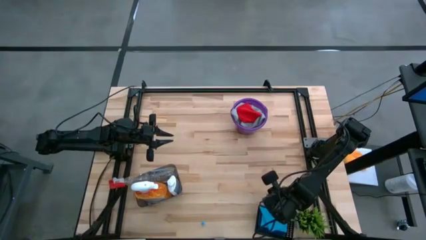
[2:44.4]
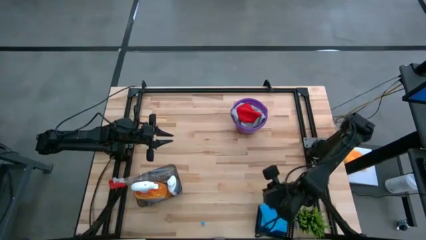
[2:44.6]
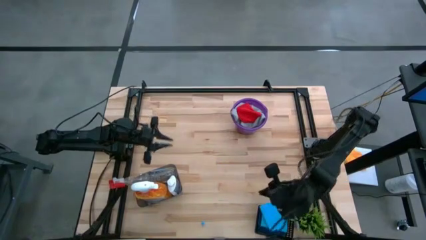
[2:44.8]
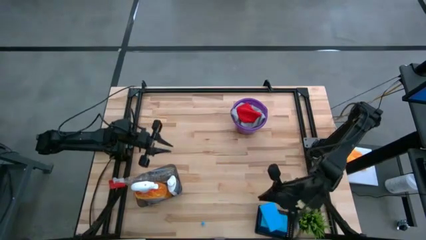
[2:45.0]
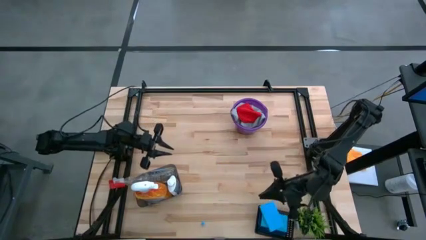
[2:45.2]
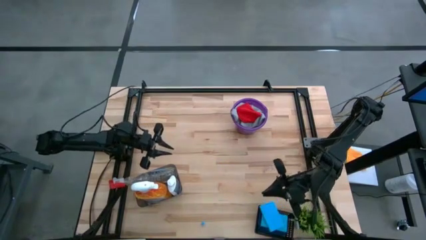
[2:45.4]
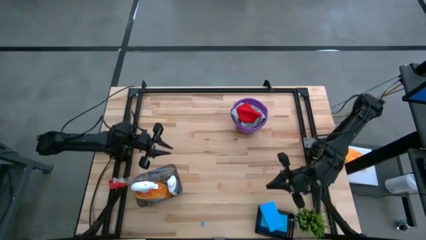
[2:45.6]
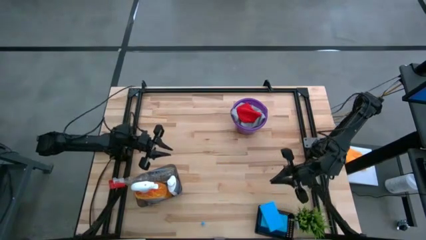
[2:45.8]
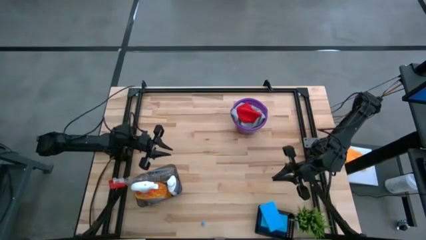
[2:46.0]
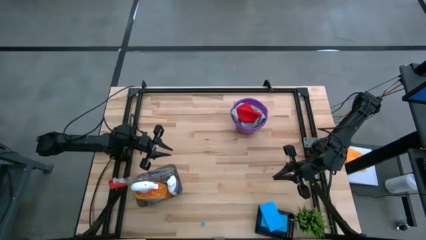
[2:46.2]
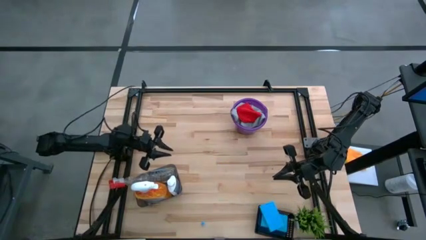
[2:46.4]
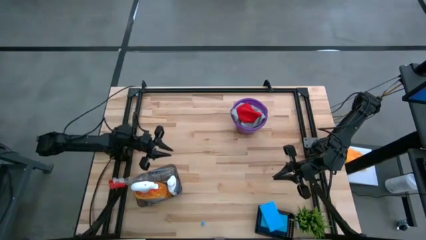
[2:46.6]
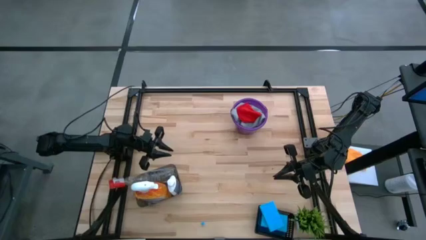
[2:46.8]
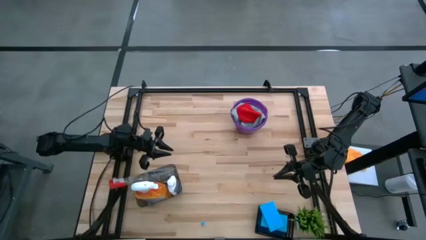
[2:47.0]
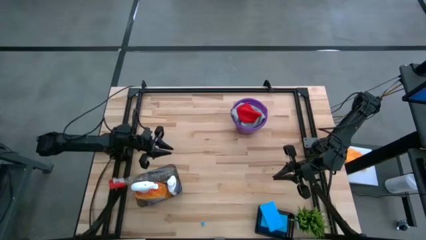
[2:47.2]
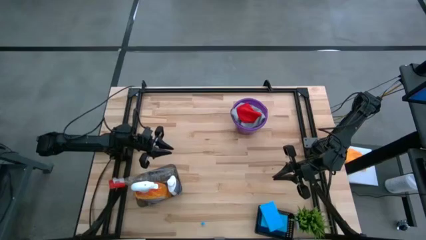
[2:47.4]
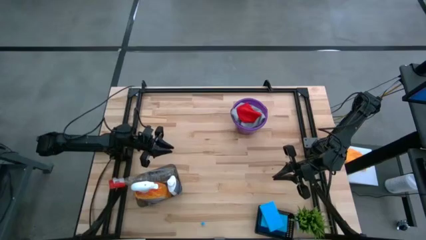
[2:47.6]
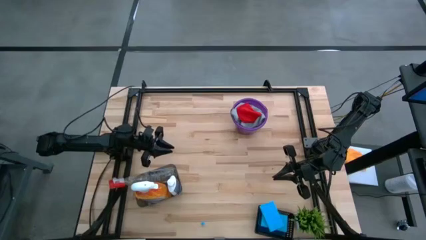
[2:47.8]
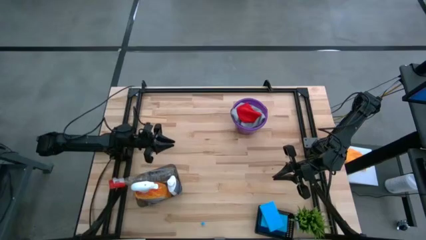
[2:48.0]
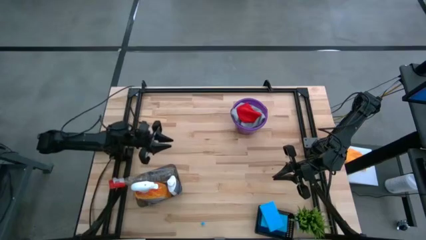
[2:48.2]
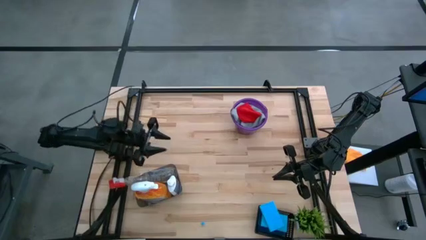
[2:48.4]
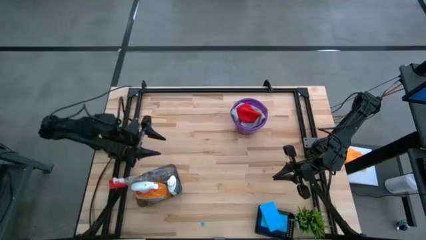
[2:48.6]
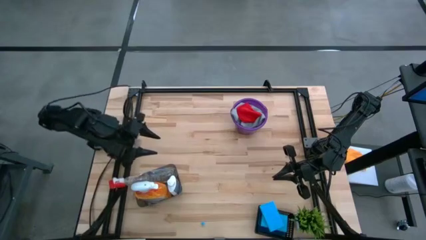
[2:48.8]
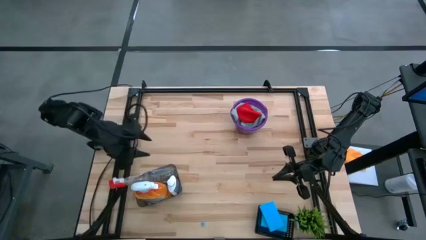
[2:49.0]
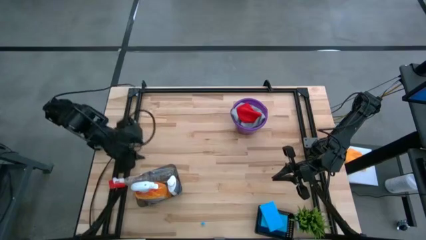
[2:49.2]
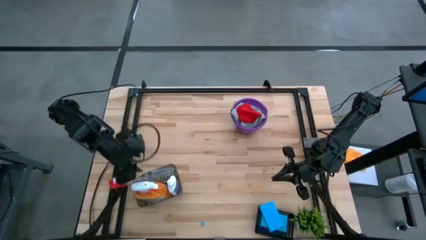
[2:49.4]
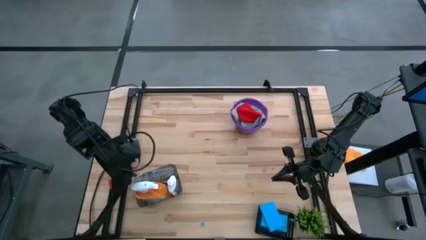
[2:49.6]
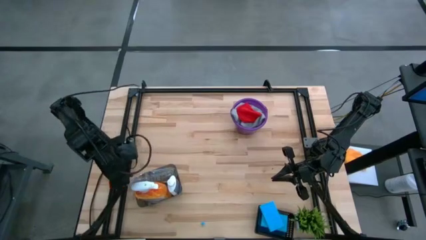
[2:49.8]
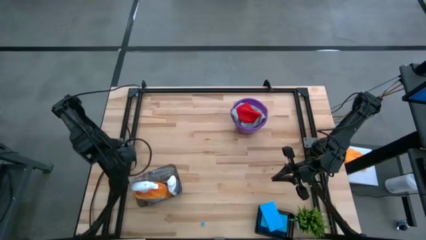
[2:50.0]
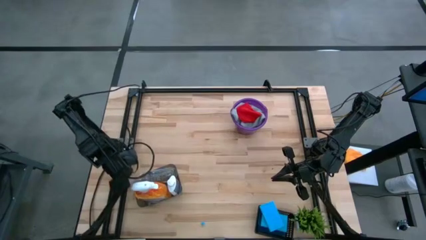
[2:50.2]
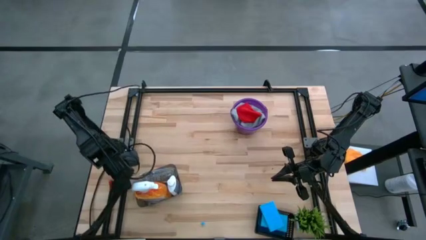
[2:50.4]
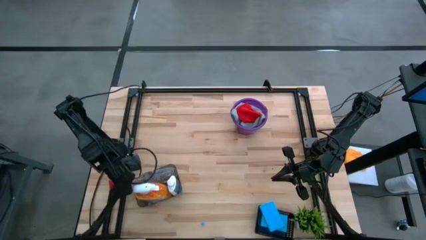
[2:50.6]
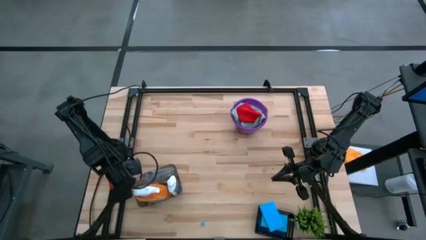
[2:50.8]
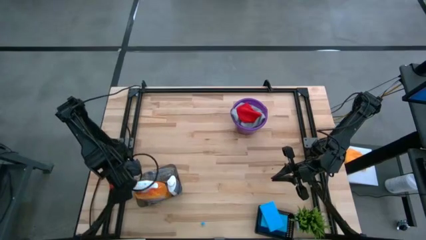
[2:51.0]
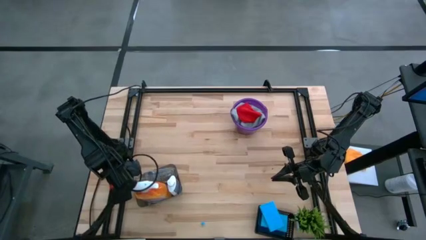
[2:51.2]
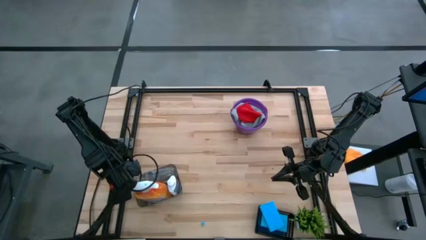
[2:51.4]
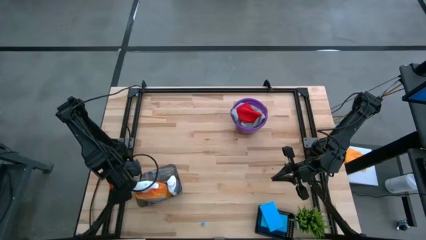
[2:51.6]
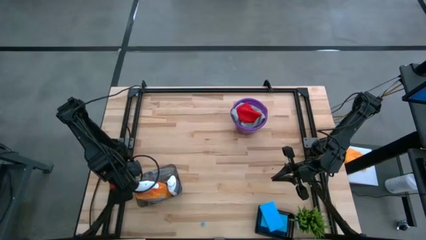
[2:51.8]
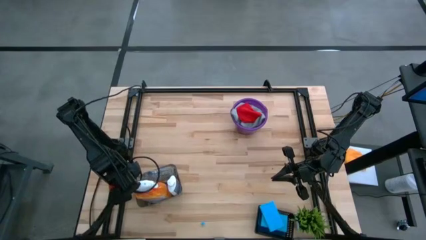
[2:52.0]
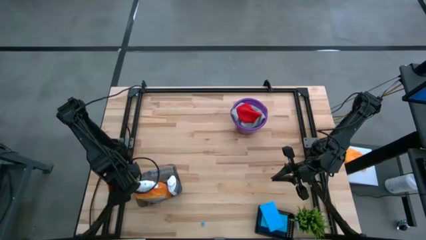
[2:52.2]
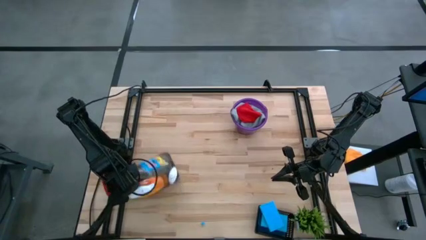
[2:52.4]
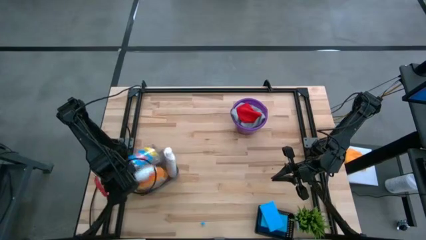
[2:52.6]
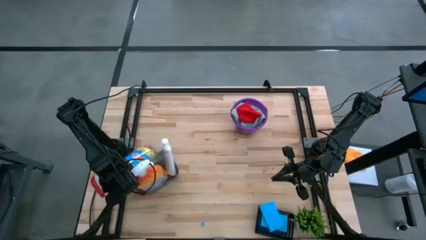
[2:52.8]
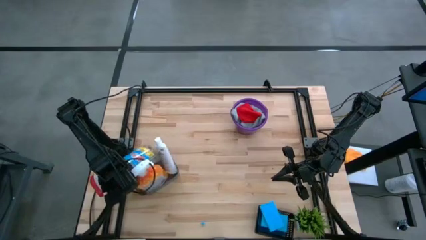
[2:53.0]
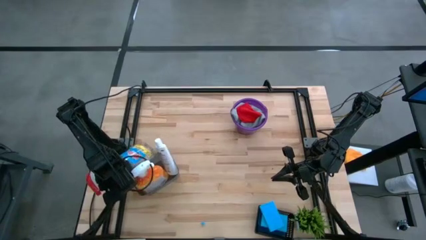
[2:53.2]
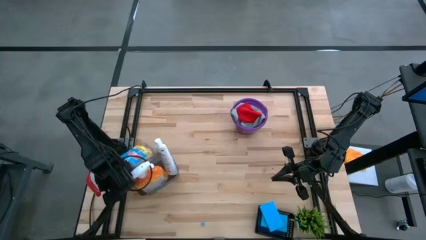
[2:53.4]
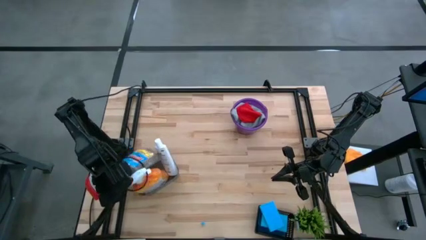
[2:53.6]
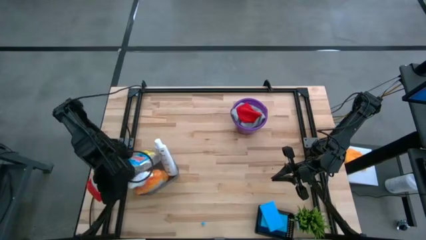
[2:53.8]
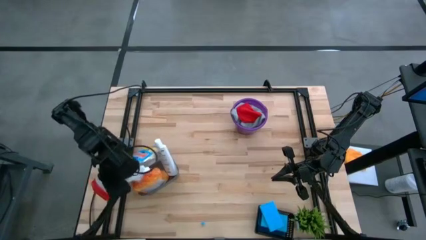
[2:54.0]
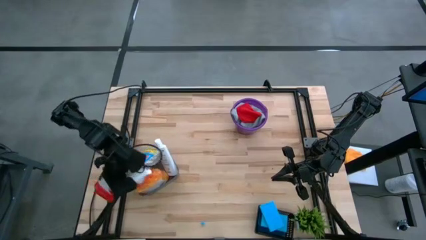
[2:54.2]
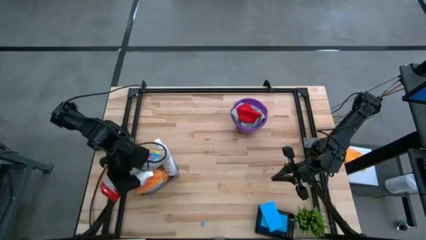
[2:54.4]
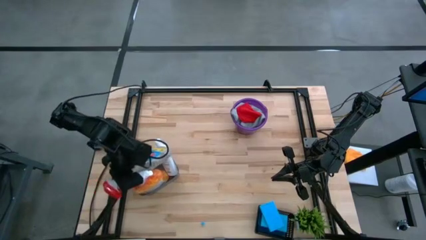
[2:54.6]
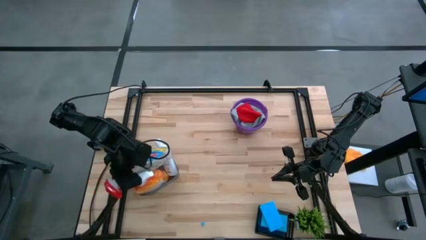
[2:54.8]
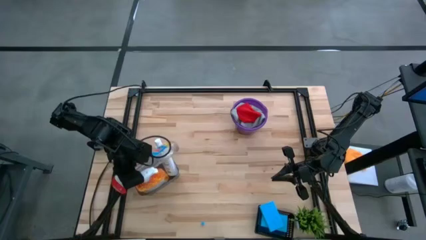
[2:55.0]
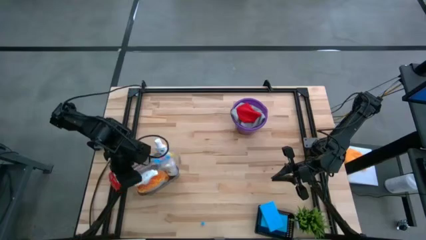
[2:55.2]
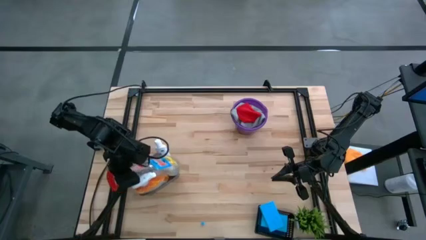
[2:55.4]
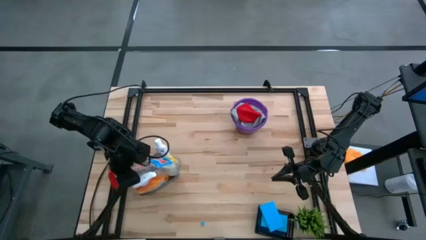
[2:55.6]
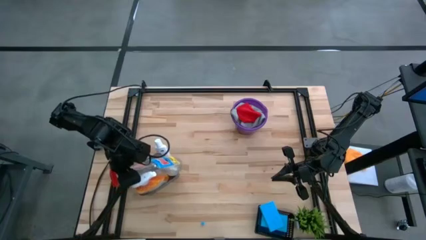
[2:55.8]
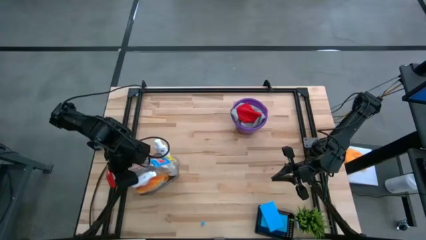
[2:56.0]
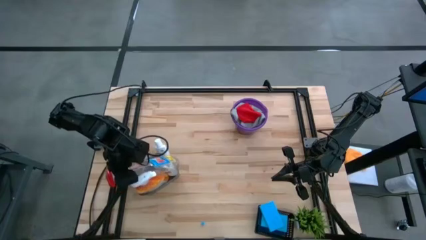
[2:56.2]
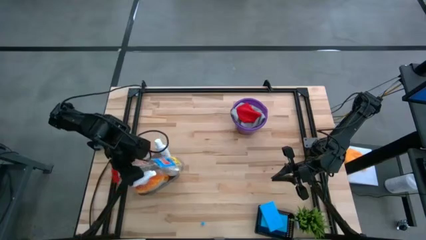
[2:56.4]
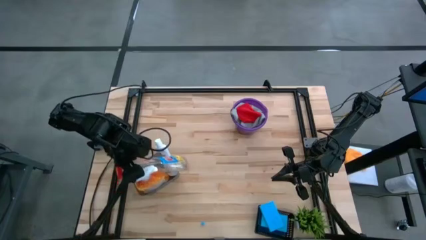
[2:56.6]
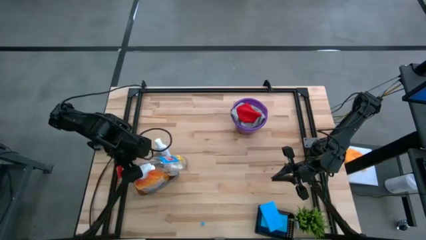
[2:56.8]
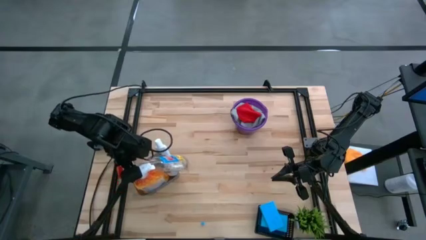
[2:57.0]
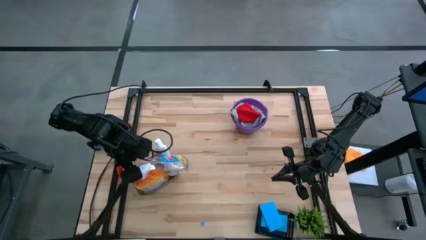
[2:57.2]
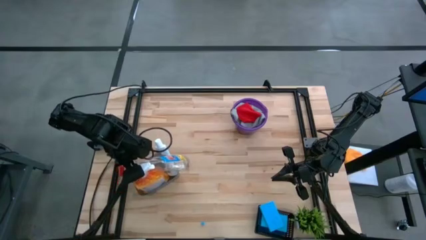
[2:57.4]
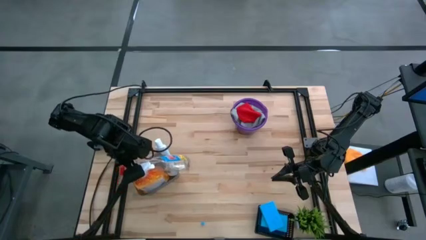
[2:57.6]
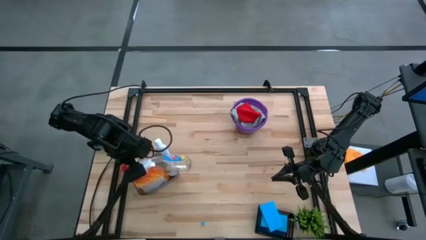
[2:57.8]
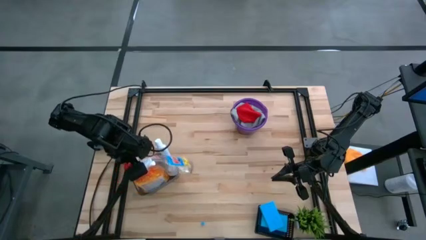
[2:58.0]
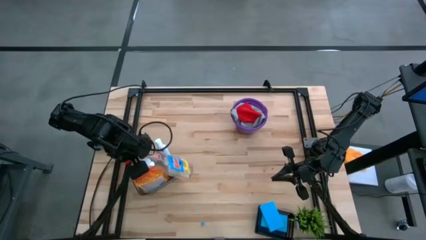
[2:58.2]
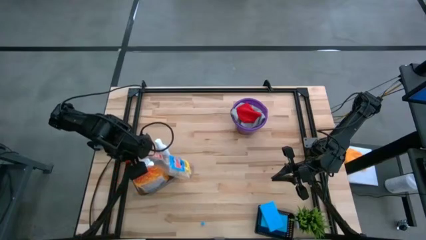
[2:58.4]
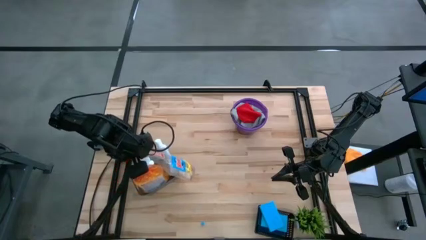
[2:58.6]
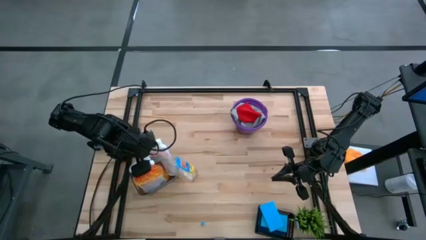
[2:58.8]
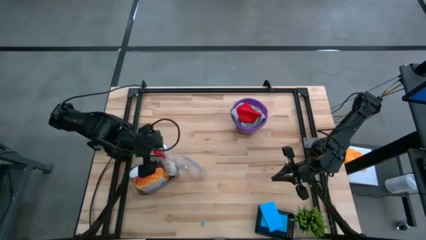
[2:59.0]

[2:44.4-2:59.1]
Task: Pick & Place Kitchen Items
Adjust the transparent spray bottle in the gray bin
